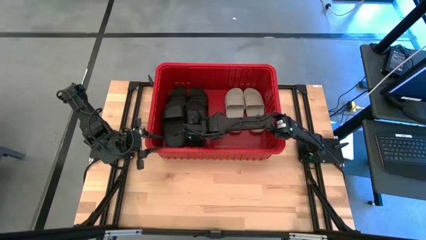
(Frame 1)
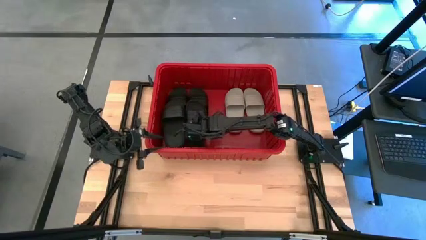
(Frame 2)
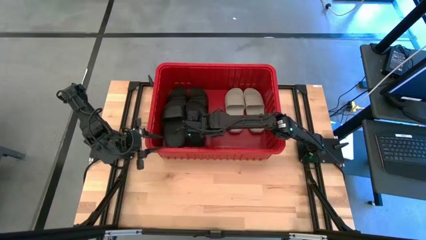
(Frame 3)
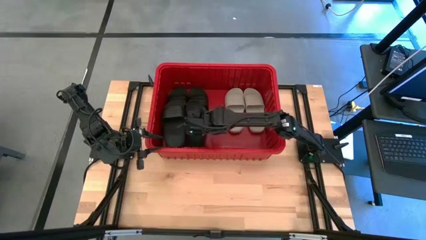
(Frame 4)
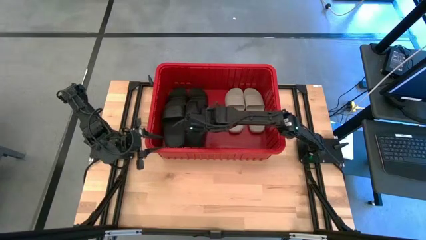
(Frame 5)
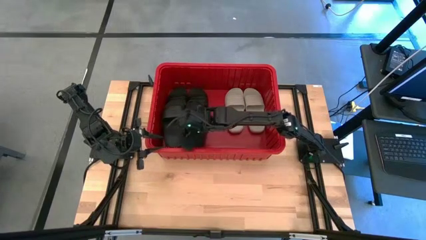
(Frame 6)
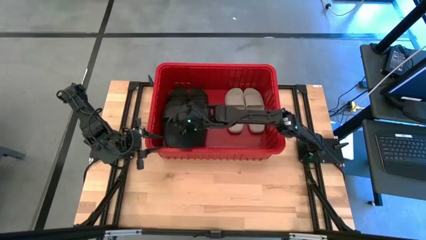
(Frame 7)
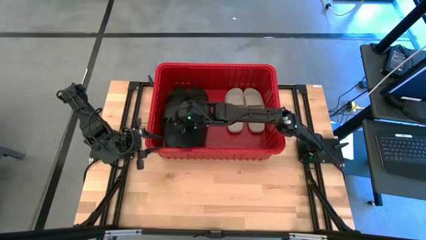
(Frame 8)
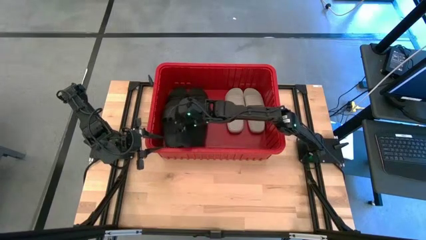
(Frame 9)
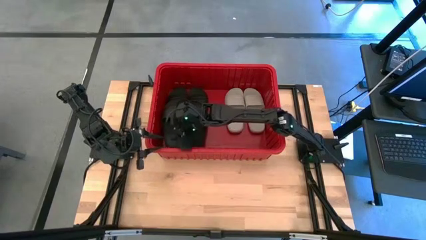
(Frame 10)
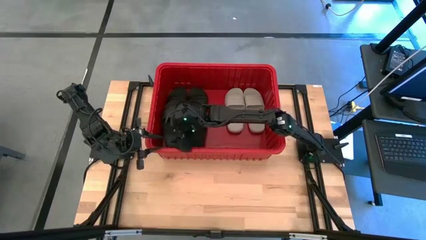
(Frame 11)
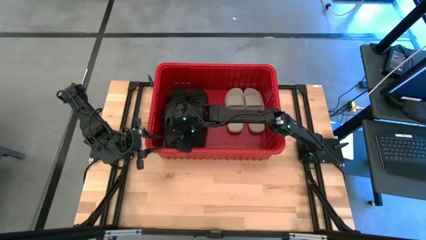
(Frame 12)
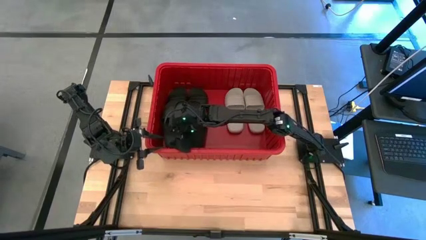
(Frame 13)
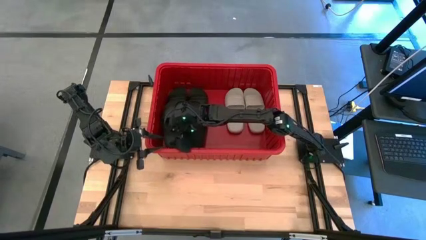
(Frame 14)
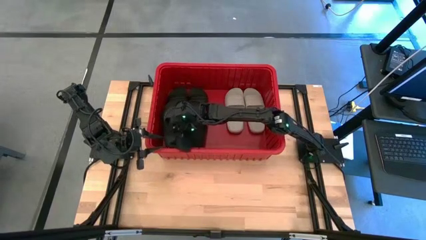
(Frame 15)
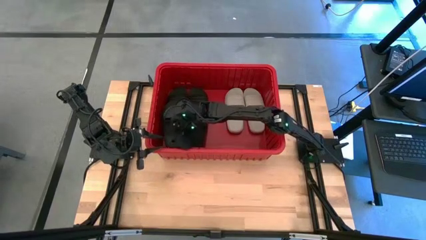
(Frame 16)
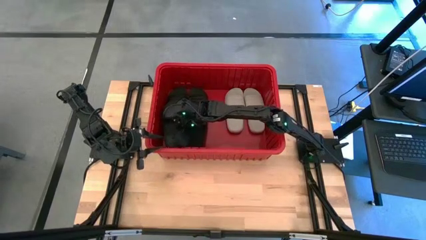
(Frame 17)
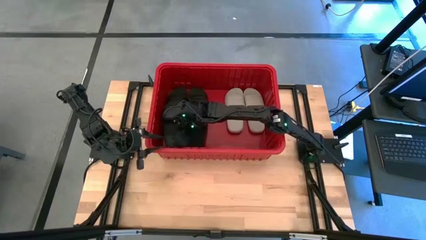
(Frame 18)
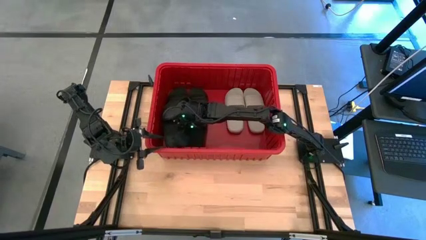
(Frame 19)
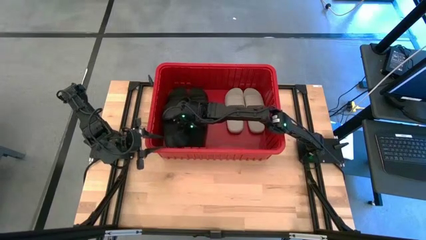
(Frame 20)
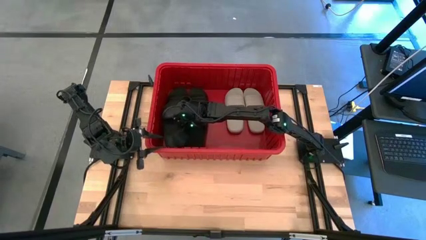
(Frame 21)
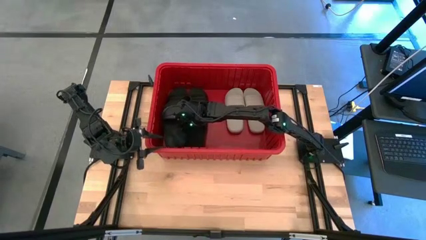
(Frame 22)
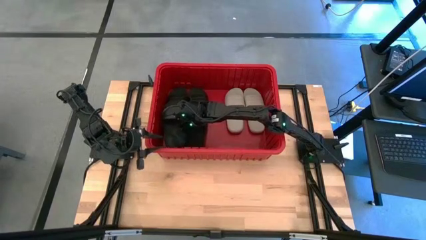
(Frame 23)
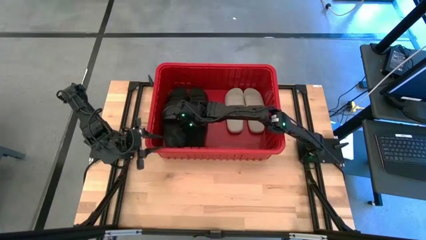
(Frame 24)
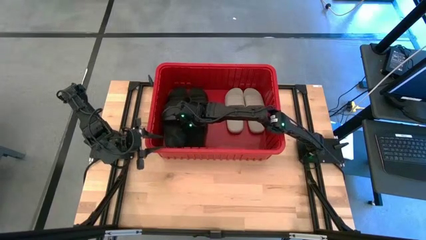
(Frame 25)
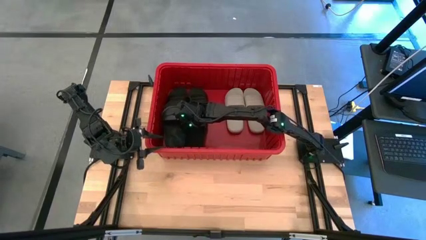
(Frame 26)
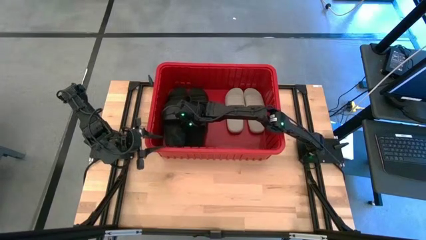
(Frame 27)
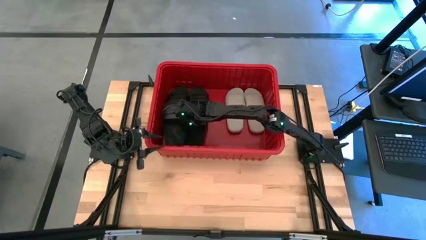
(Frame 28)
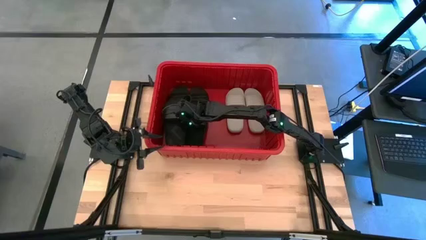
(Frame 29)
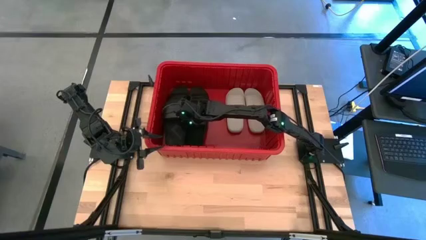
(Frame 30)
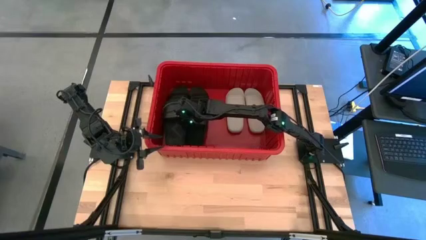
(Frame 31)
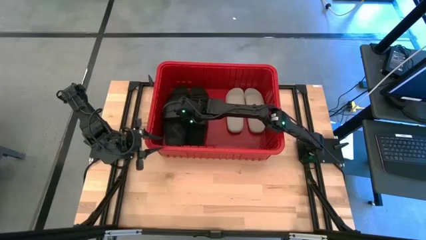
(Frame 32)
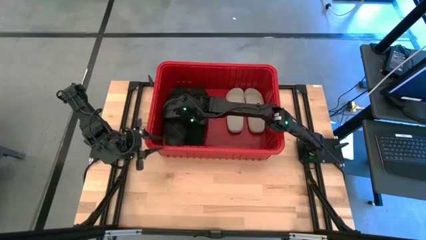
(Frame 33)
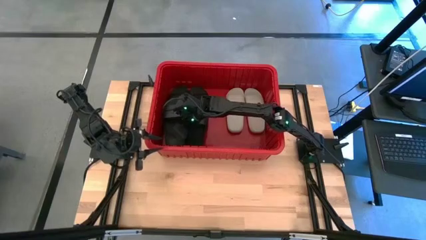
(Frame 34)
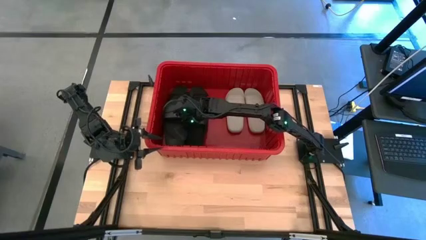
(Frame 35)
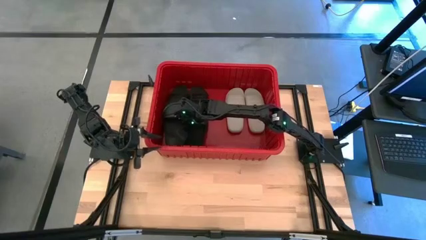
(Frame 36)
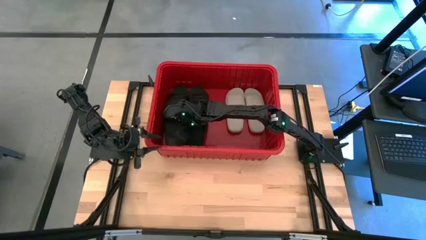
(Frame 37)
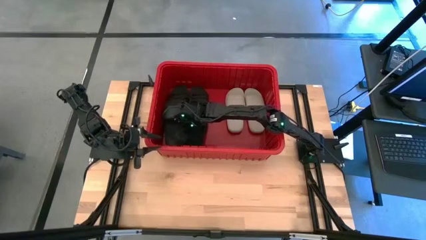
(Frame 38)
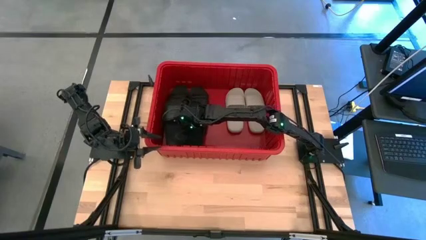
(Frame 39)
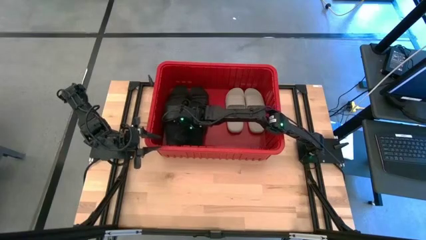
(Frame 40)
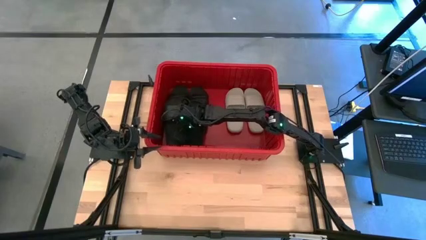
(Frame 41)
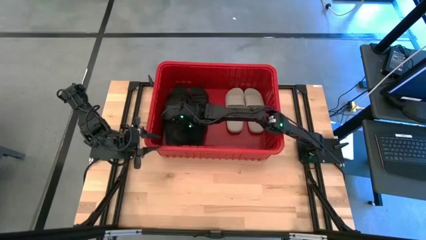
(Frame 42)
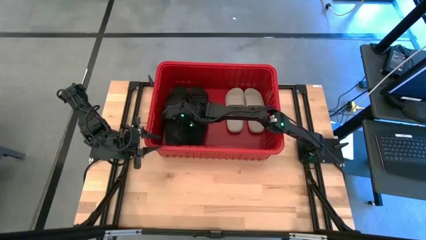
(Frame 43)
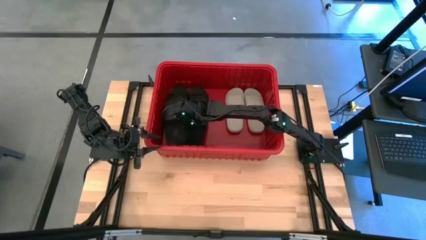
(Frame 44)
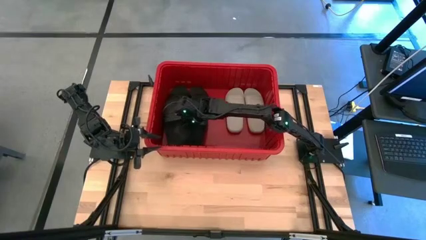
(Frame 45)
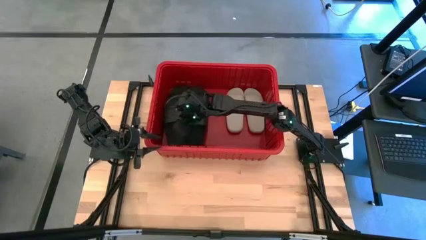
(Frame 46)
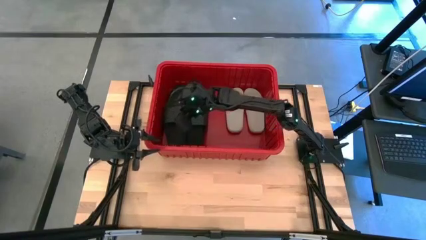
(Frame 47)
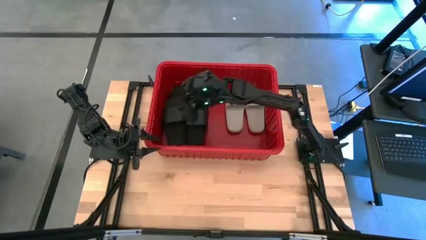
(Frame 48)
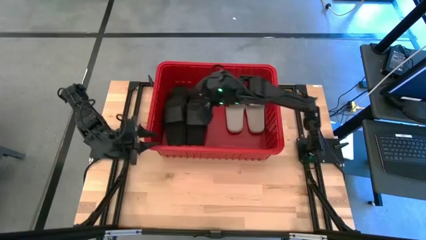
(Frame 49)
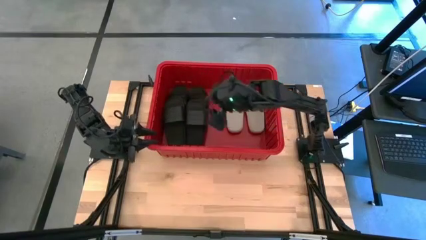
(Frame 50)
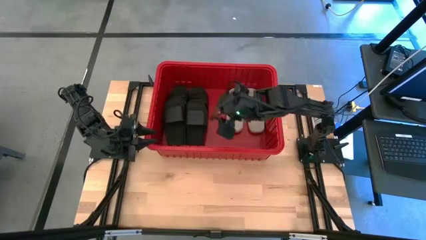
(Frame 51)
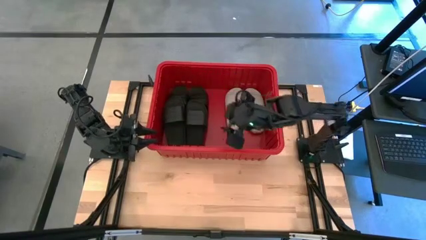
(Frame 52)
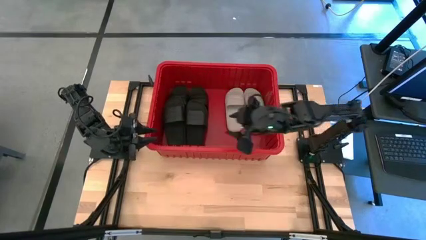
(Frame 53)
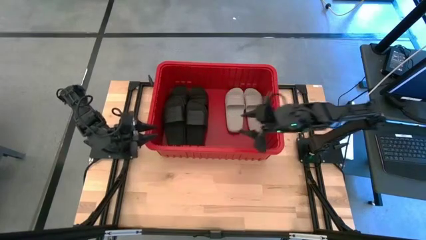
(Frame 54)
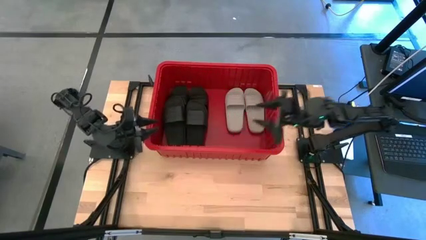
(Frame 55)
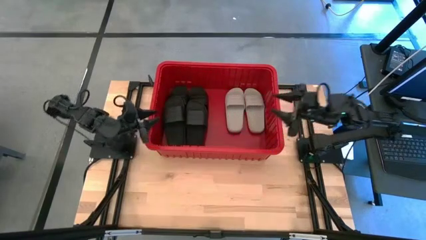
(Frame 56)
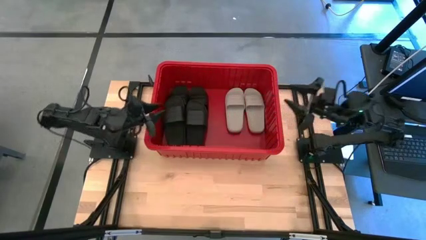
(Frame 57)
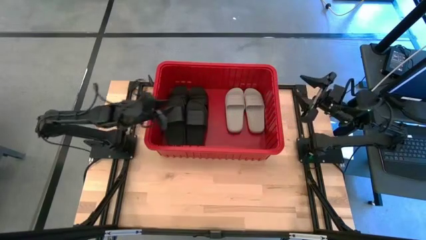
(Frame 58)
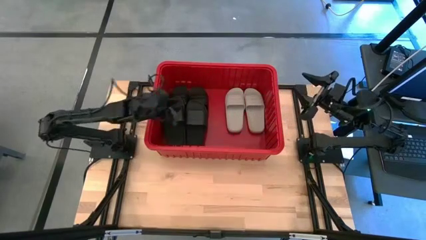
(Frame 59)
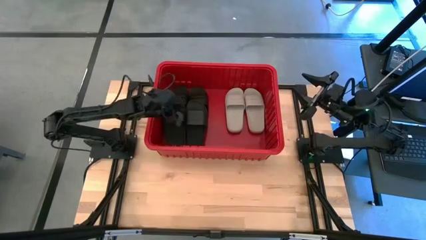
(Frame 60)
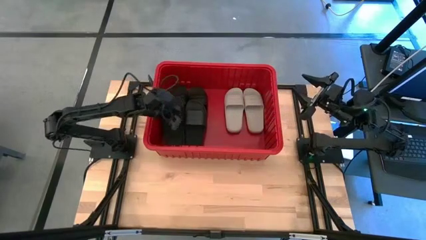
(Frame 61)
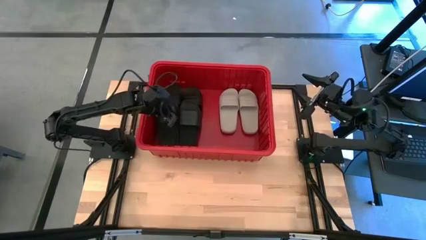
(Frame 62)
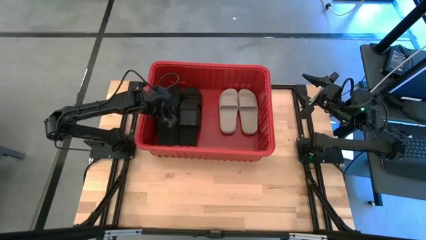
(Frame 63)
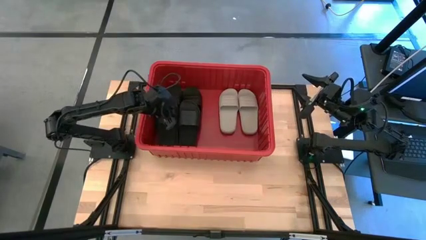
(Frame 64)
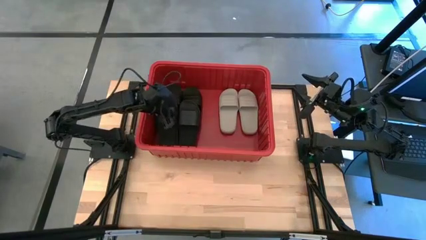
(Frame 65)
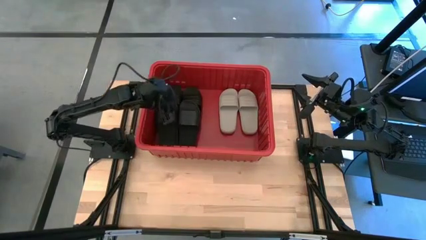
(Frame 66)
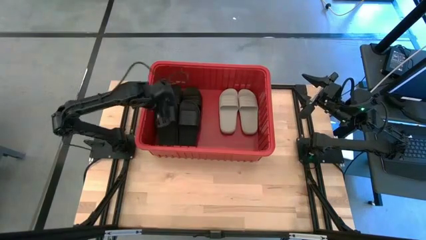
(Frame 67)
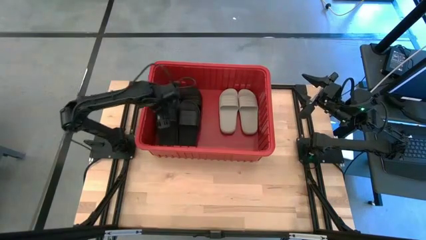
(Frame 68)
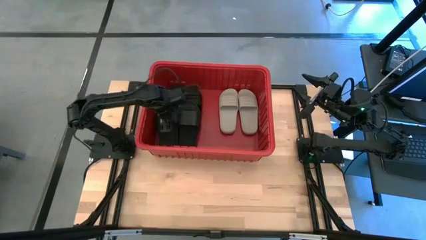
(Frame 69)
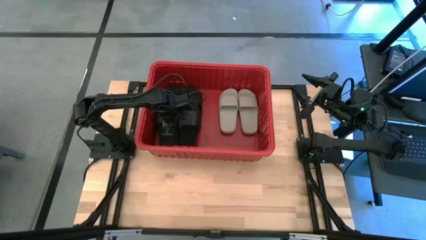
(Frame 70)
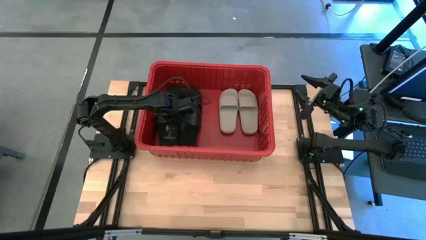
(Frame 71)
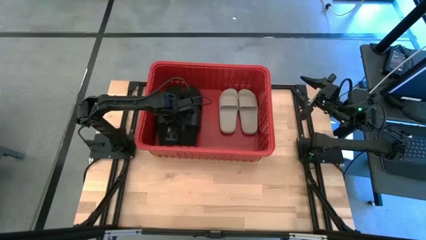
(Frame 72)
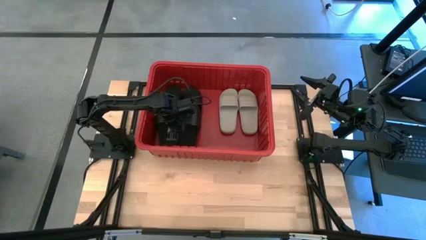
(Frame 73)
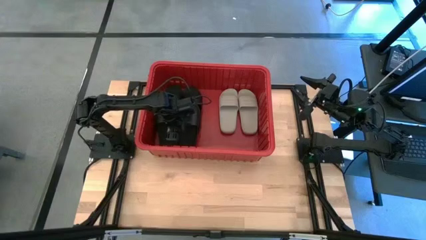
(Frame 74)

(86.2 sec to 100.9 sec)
Task: Pick and place slides into bin
Adjust the black slides in the red bin

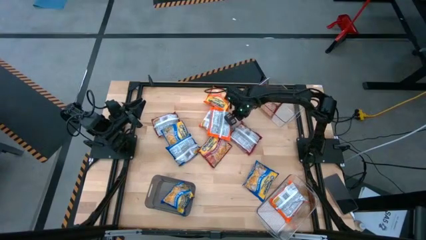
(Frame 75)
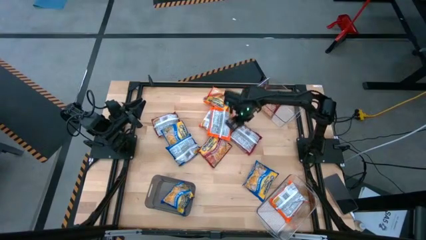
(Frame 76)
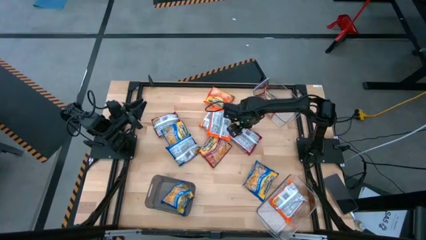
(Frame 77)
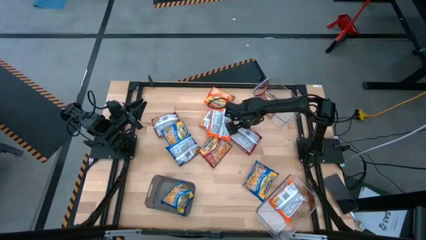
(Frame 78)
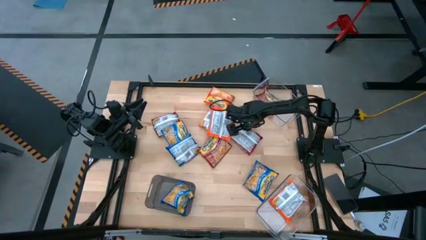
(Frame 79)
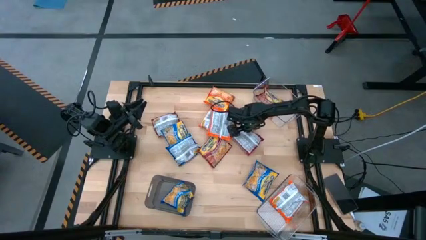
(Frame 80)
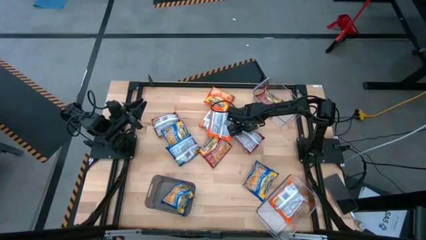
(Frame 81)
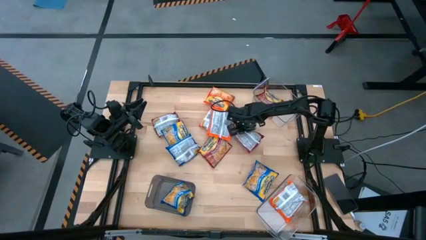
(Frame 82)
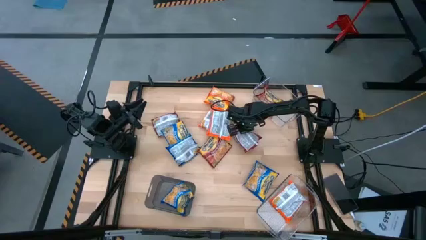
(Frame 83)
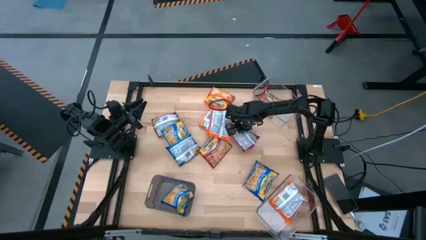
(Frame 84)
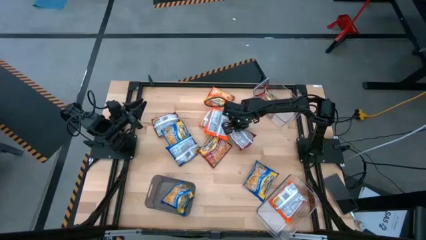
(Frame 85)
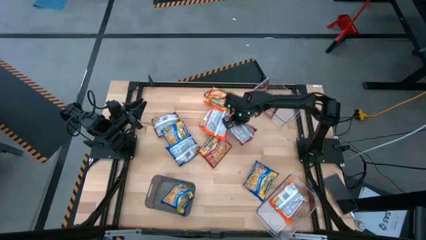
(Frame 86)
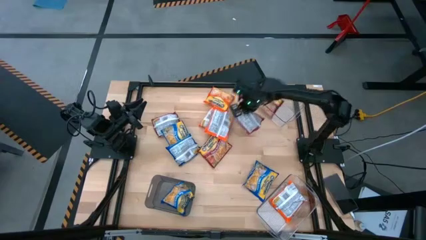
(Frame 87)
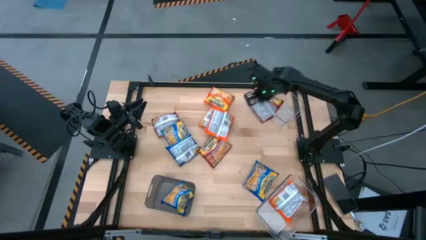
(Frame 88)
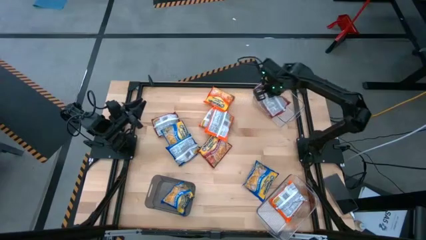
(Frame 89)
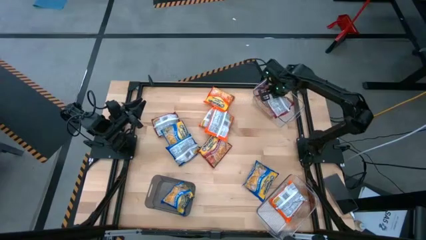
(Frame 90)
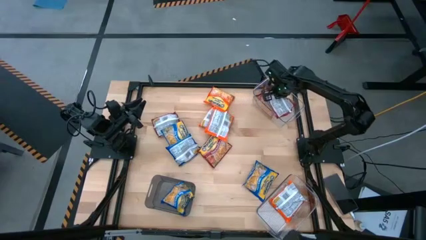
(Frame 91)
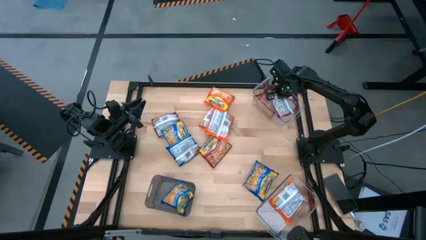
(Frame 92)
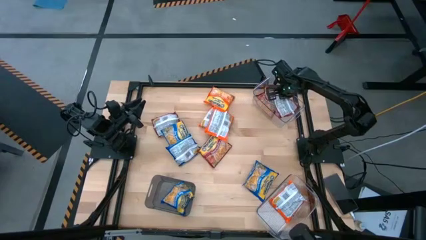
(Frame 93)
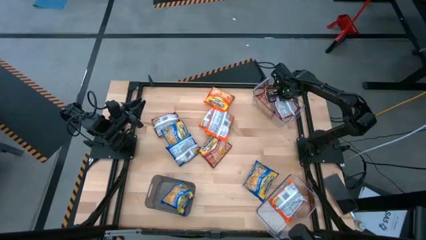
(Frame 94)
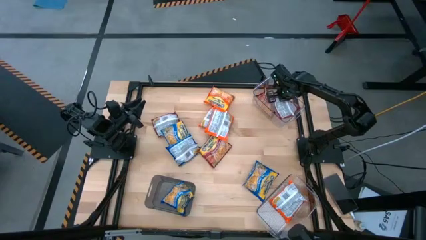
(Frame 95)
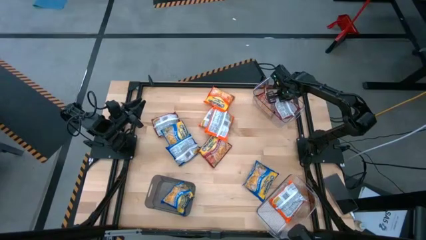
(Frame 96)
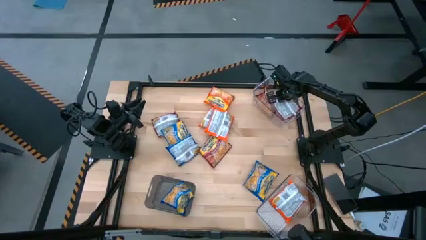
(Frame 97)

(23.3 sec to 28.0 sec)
Task: Sort Maruchan noodles
Put the red noodle pack into the top transparent bin
